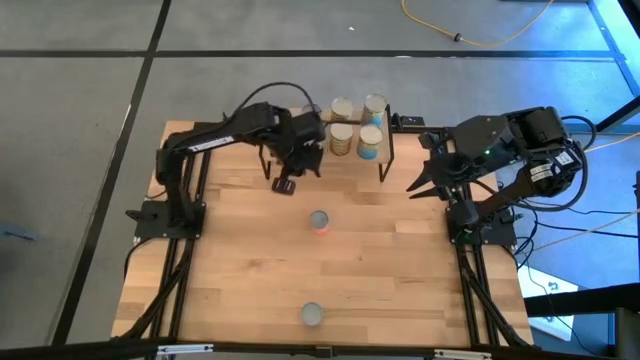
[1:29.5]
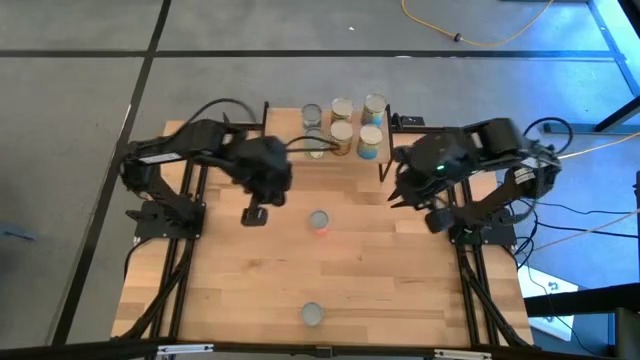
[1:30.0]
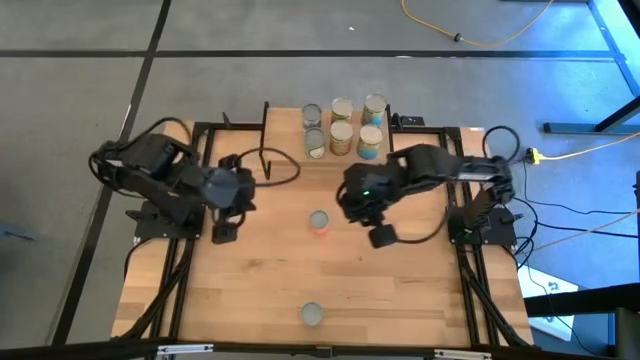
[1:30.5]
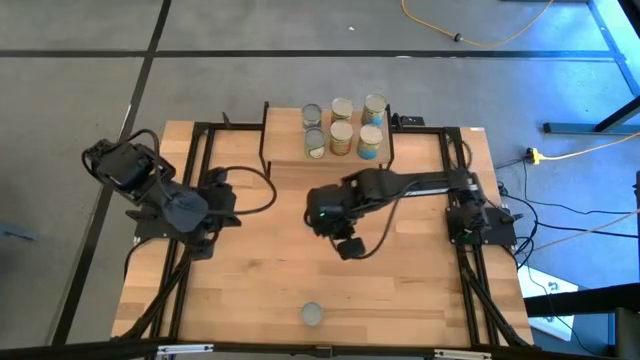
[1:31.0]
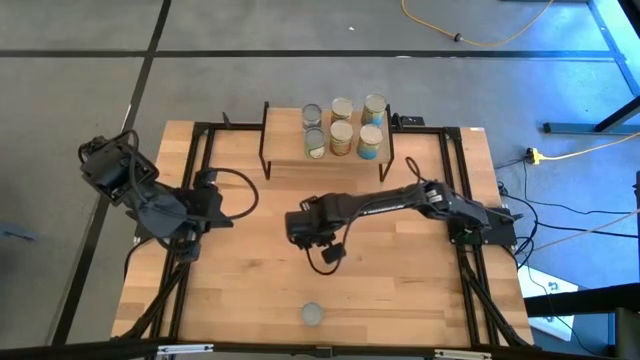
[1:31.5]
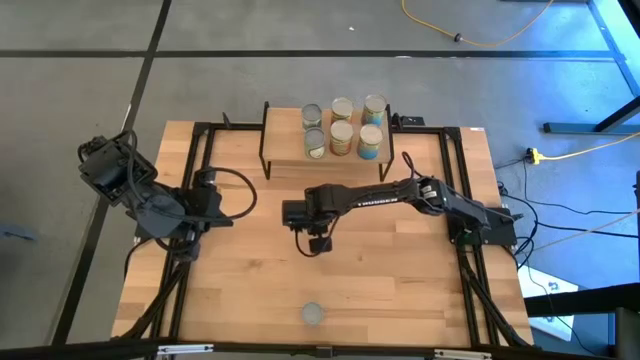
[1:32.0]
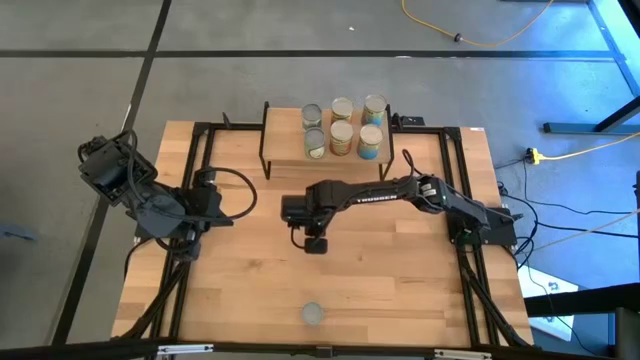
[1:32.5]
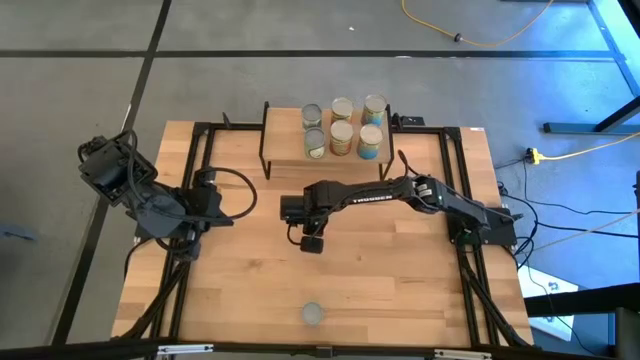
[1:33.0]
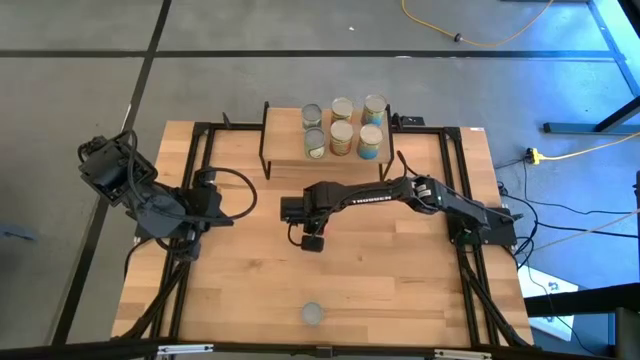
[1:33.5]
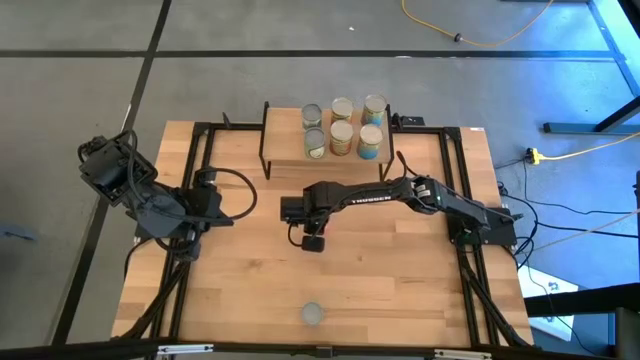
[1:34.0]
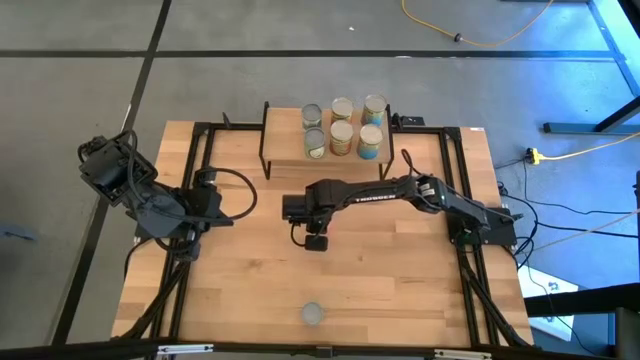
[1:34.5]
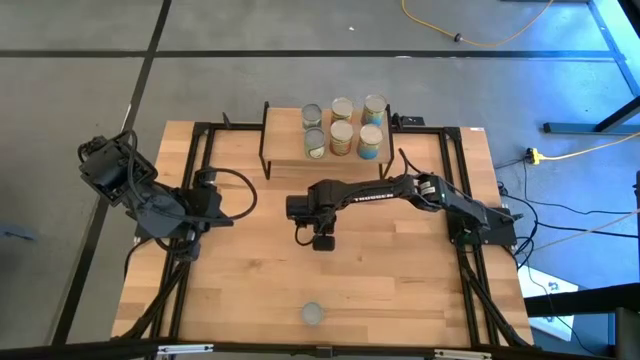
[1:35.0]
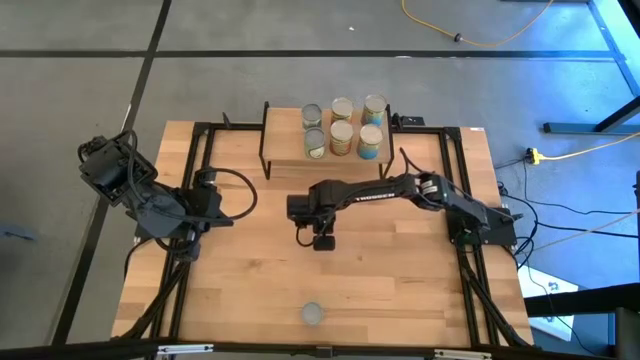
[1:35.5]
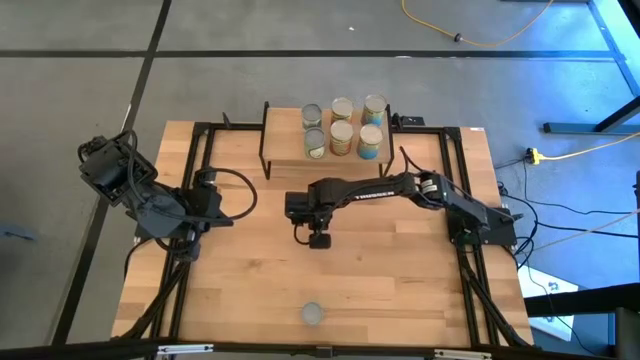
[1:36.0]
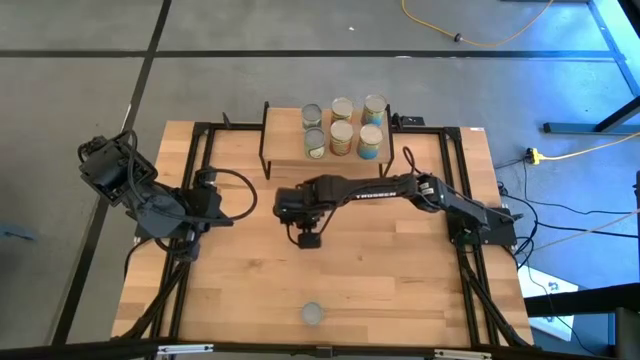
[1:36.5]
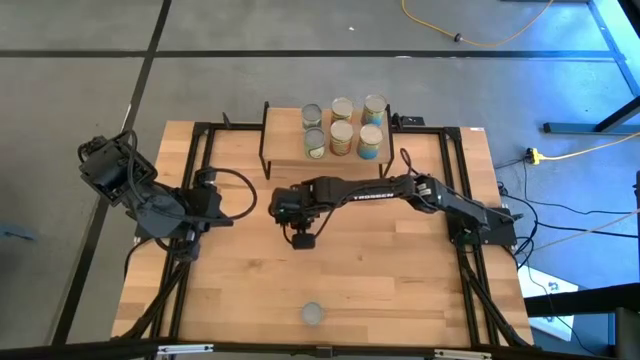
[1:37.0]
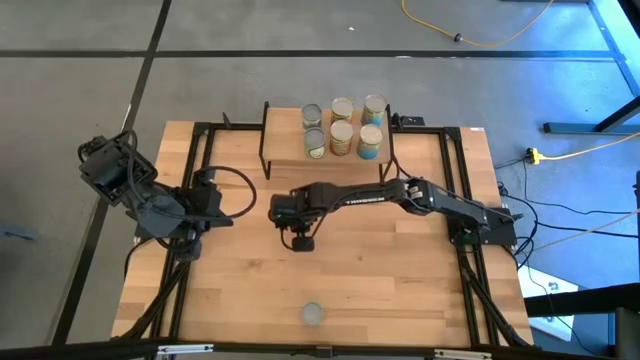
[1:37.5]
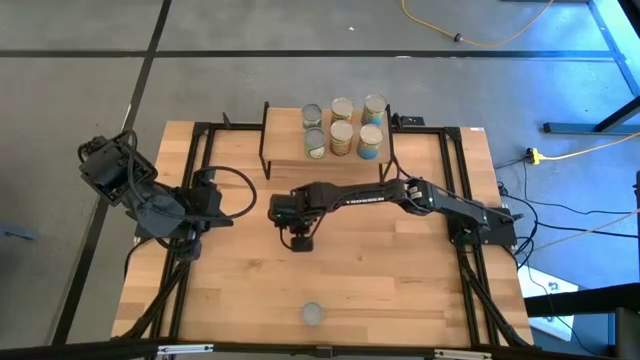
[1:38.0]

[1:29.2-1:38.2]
Task: Pick and place cans onto a shelf
Move the small canned oranges the shelf

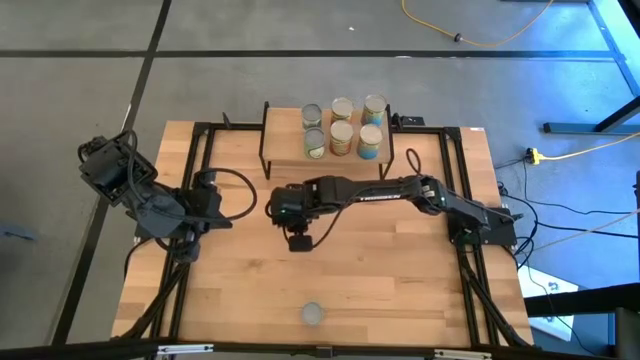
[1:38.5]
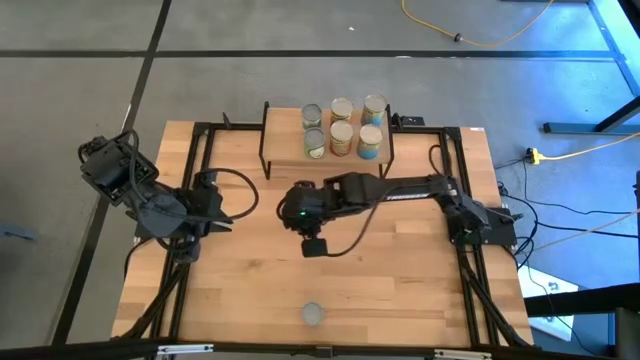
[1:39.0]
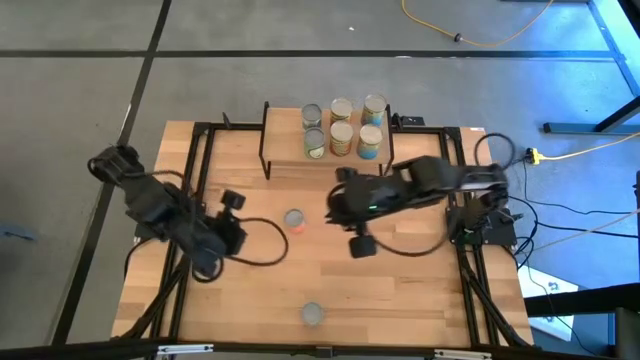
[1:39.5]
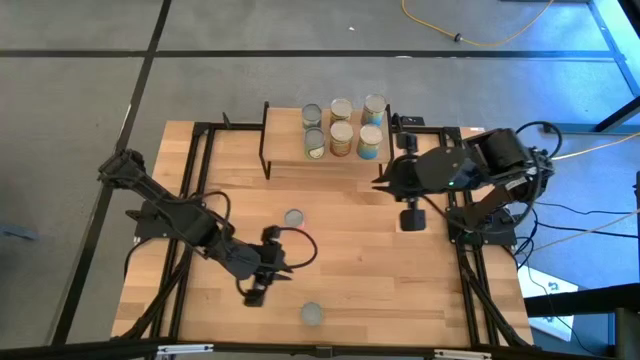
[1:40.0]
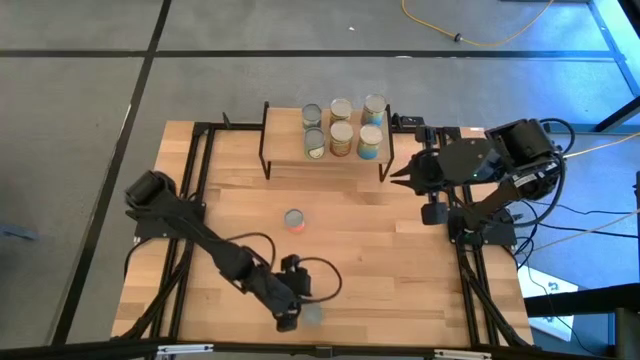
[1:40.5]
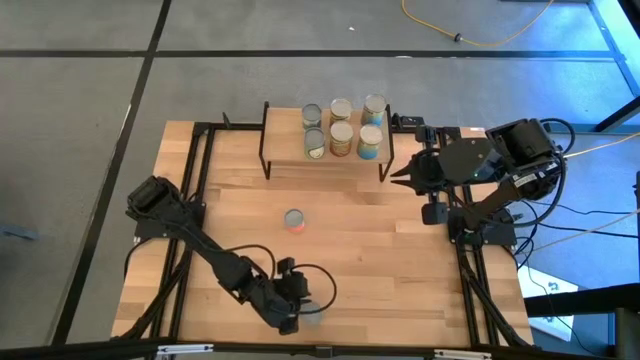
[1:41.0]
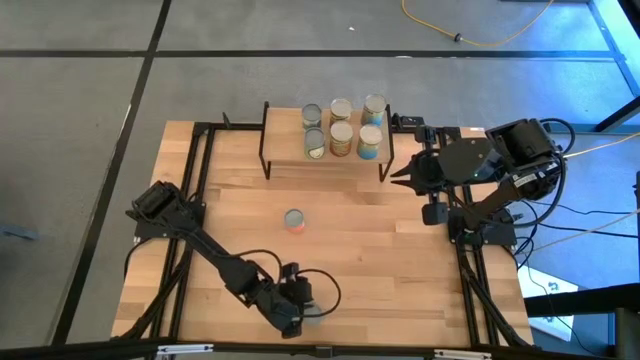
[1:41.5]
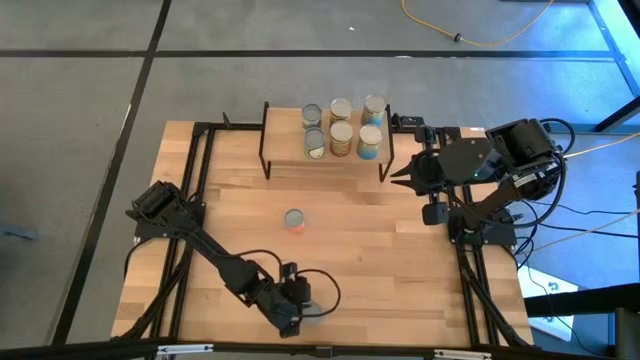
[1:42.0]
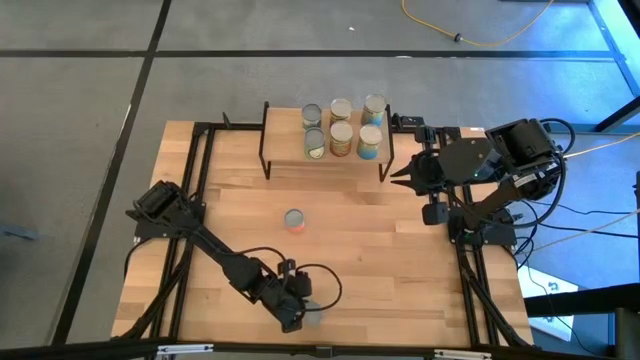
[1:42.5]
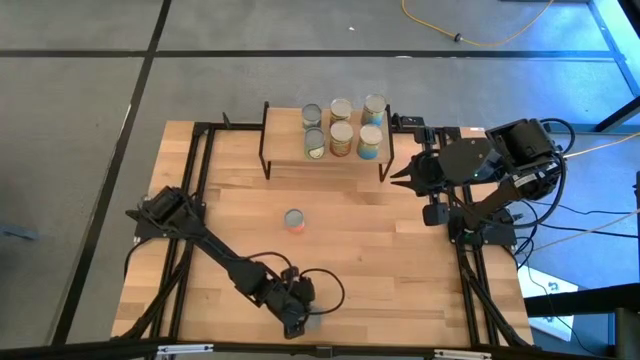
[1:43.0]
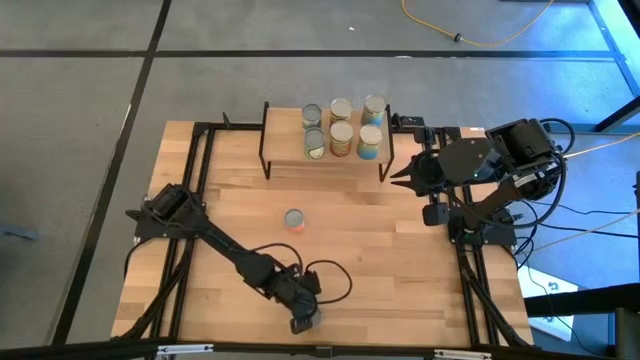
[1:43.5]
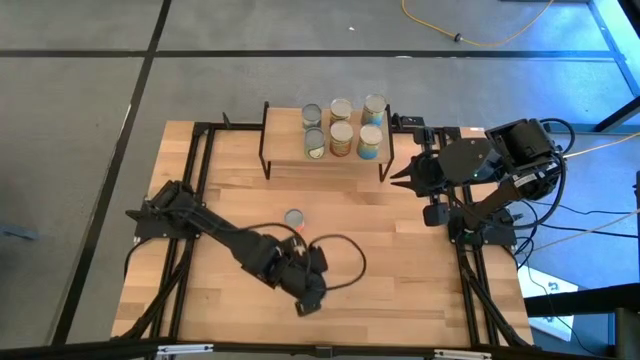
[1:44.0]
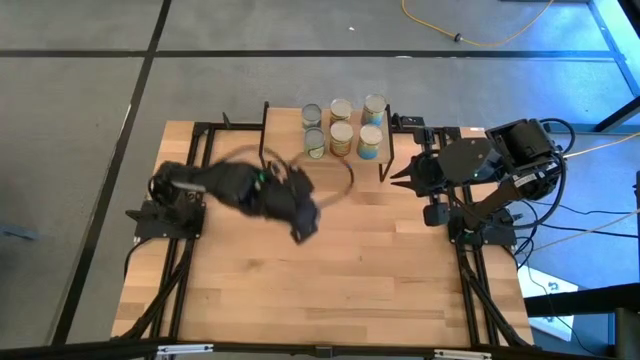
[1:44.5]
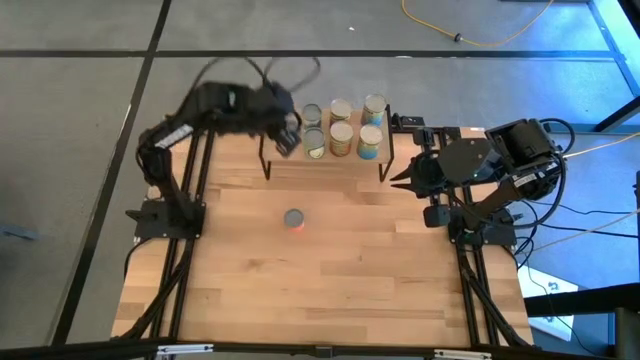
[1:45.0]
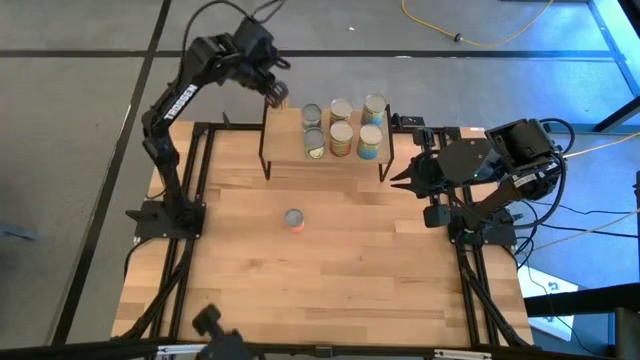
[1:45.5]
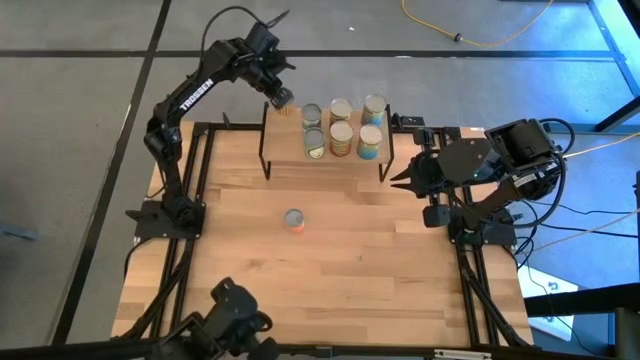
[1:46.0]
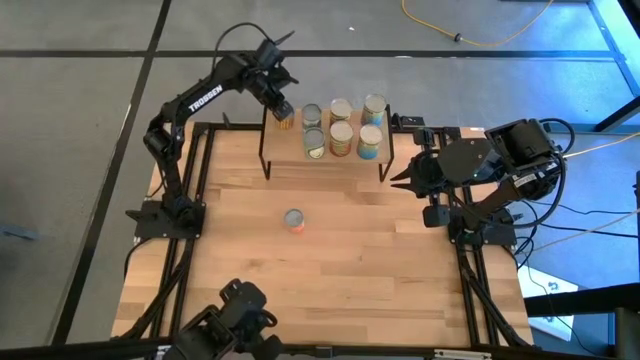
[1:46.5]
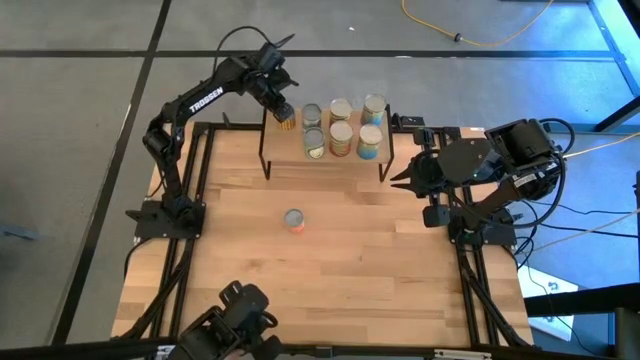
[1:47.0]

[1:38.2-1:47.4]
Put the canned beans on the shelf

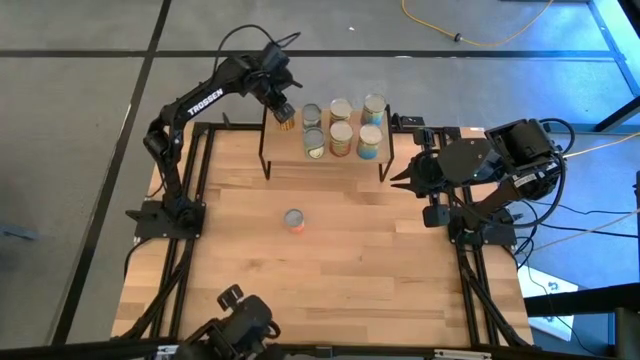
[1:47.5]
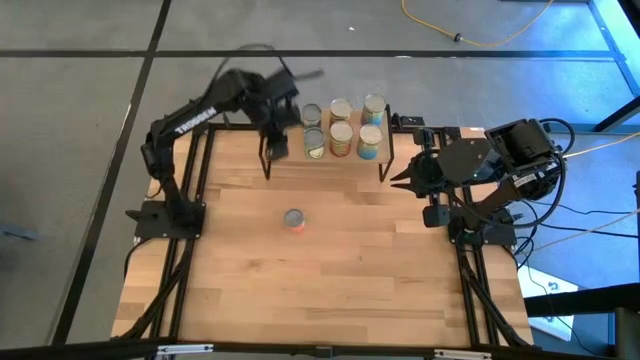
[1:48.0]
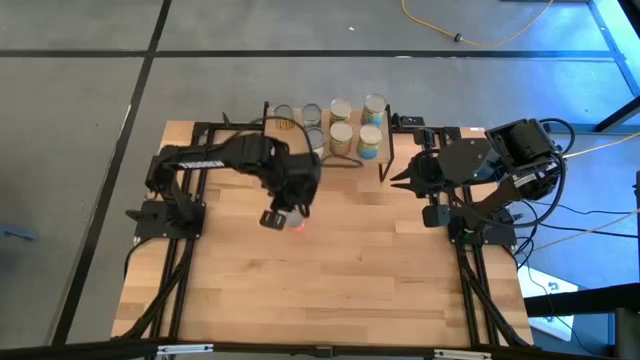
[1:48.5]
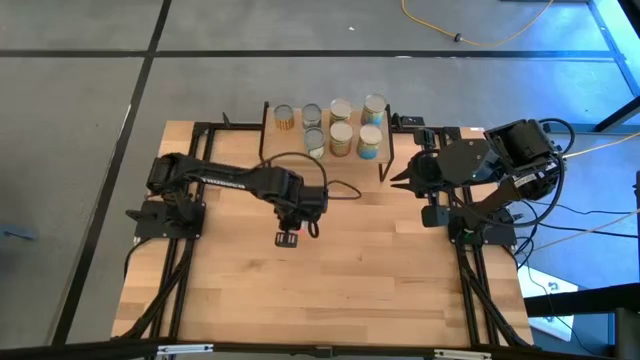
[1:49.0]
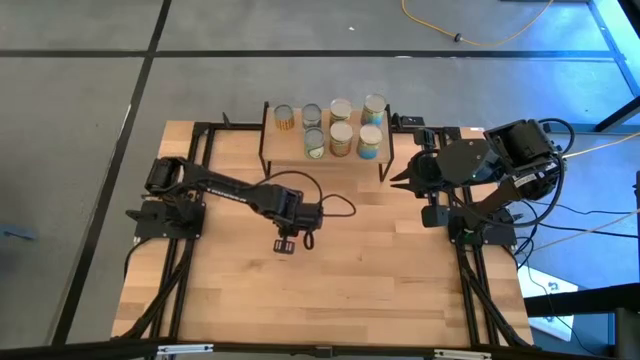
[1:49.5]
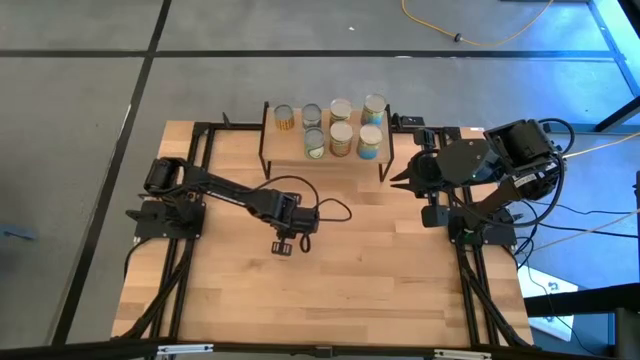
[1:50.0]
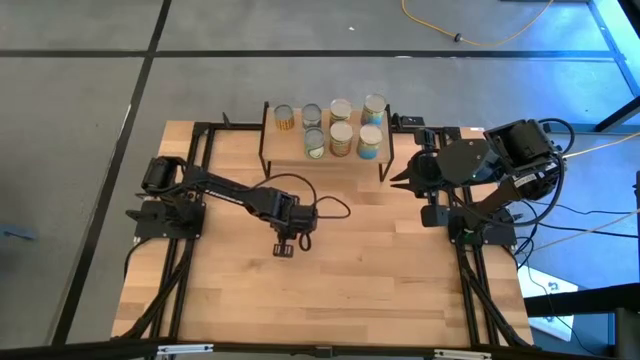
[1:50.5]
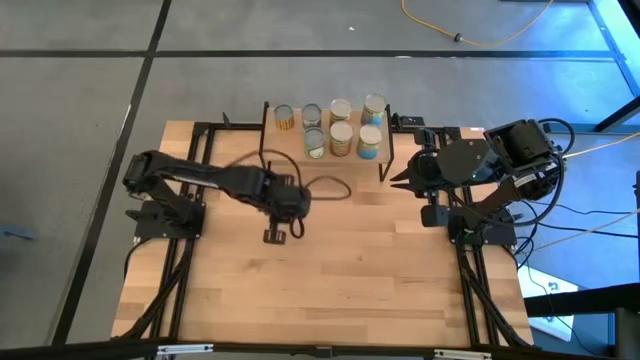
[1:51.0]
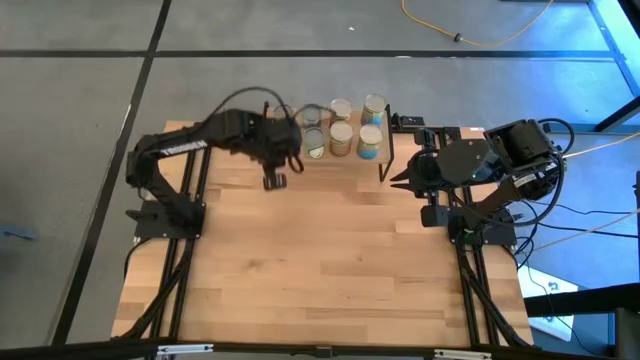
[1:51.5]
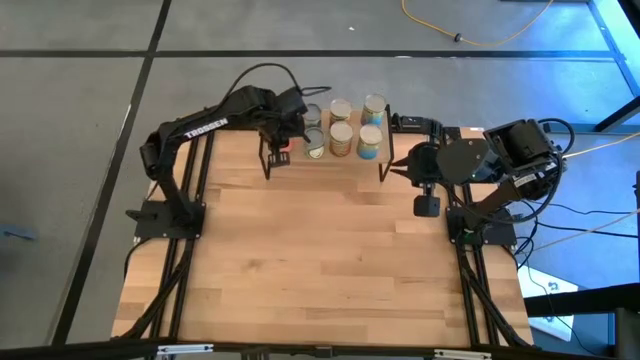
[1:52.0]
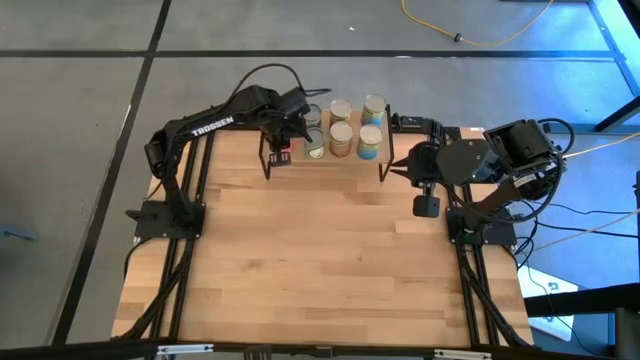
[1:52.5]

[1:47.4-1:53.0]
Put the small canned oranges on the shelf
